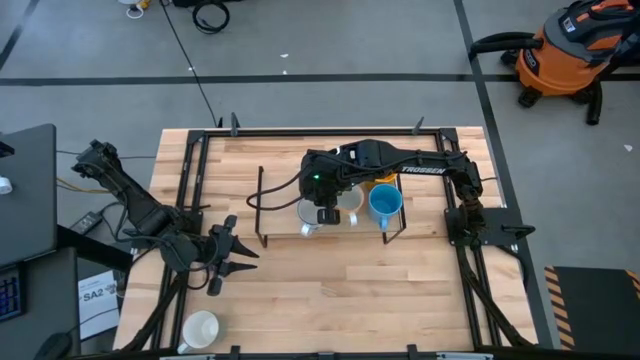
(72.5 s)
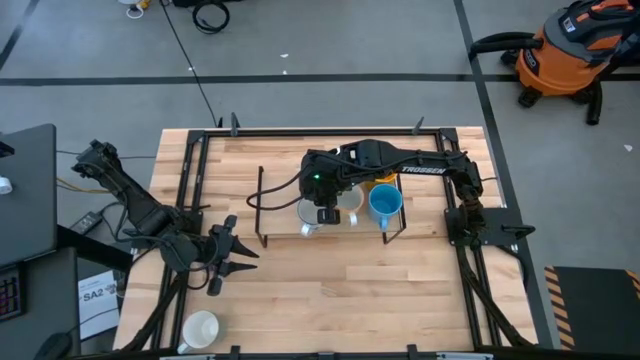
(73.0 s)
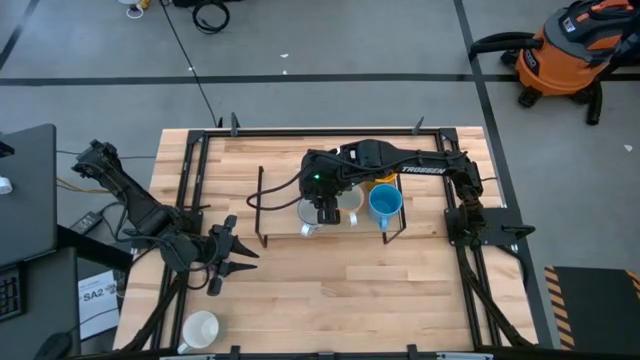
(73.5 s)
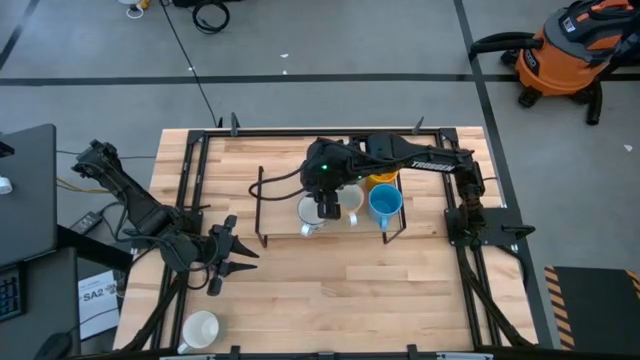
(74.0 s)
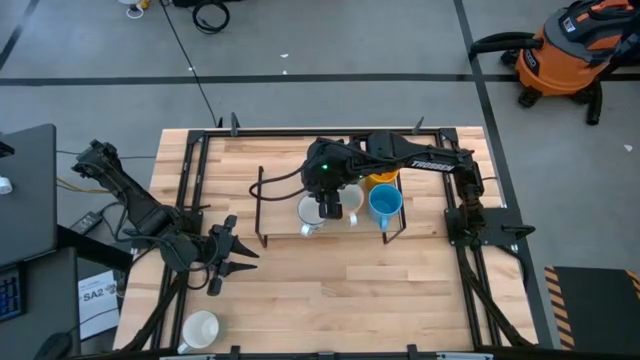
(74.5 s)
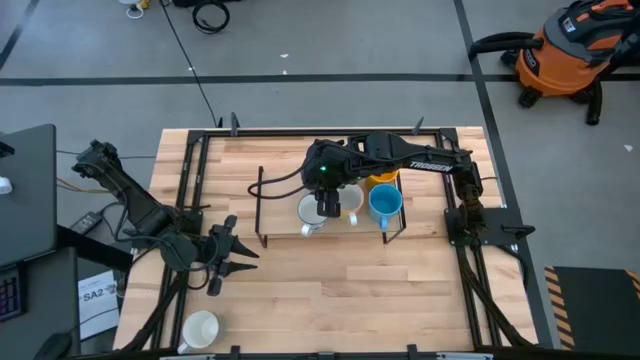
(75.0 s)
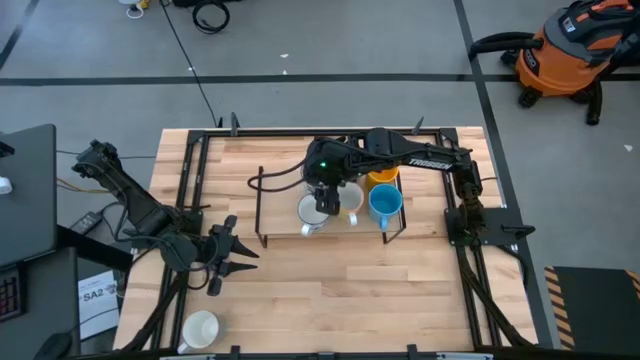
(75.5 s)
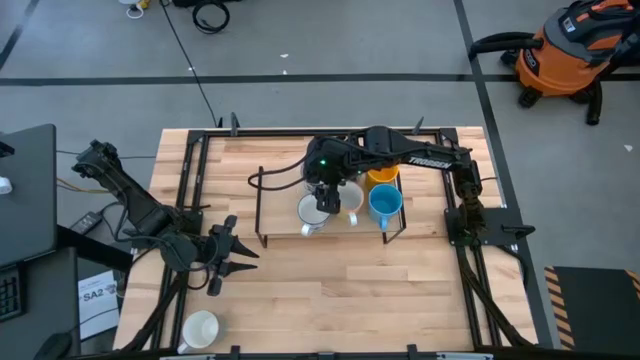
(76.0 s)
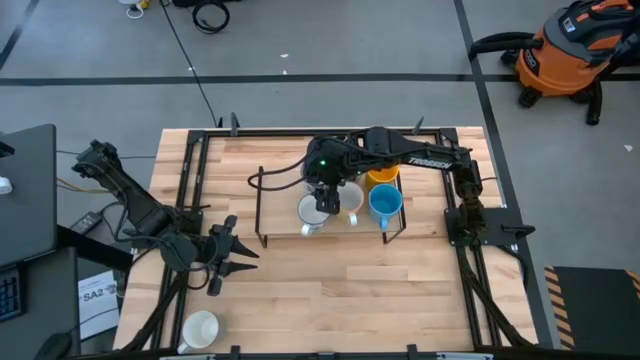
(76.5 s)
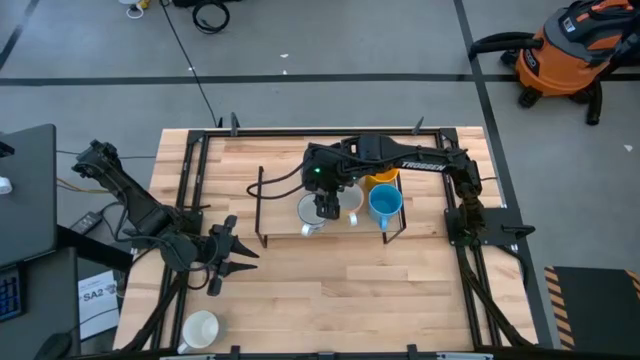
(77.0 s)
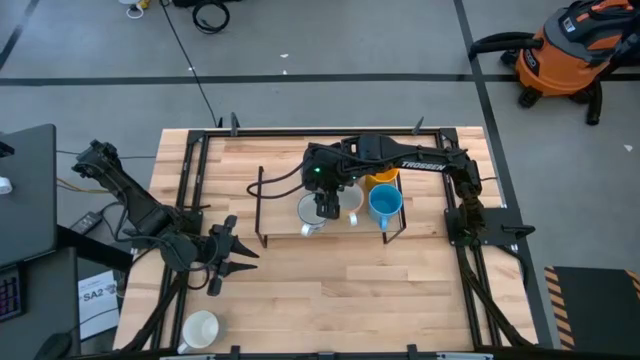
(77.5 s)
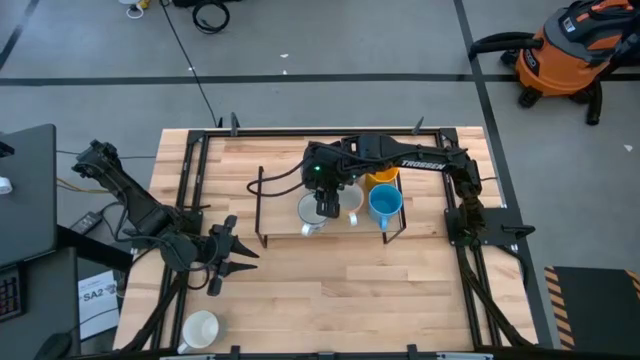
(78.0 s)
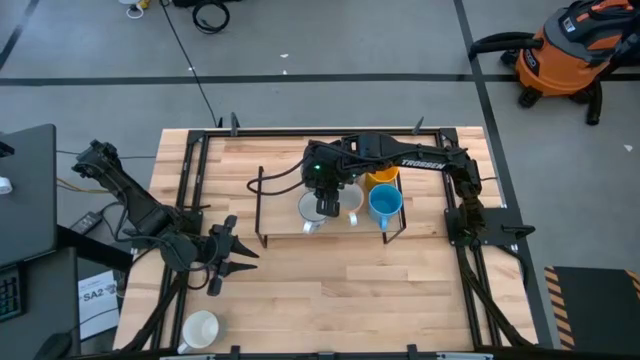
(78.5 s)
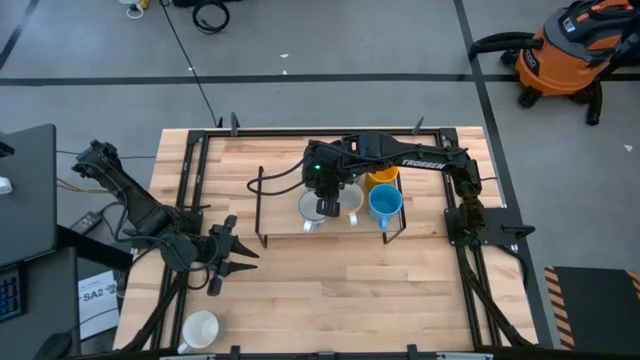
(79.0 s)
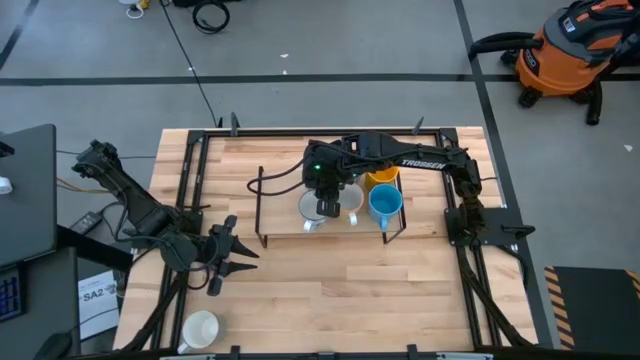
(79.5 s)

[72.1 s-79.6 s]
Task: Place coffee mugs
Adjust the blue patterned mugs on the shelf

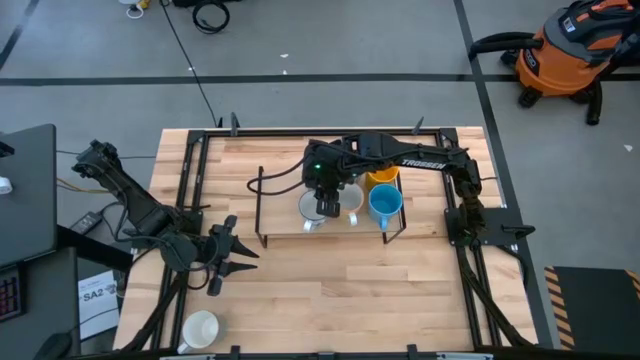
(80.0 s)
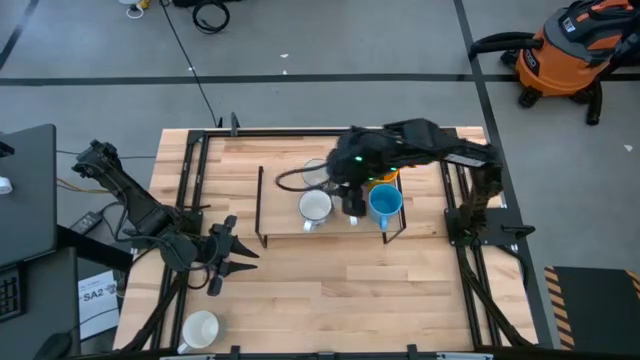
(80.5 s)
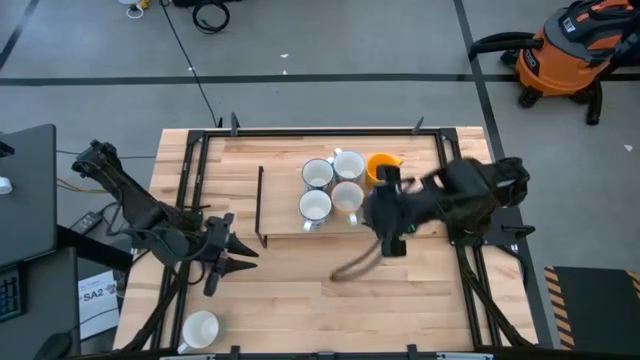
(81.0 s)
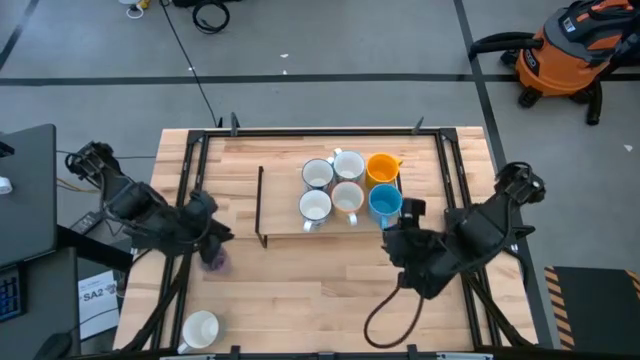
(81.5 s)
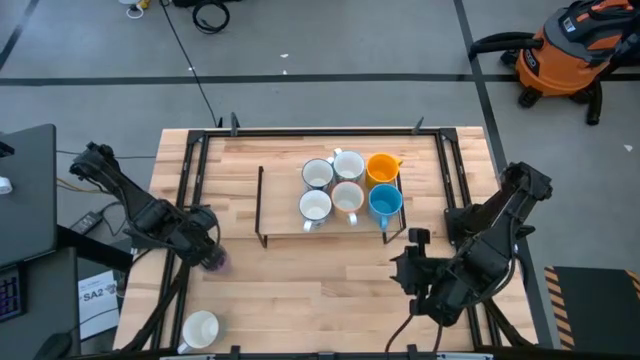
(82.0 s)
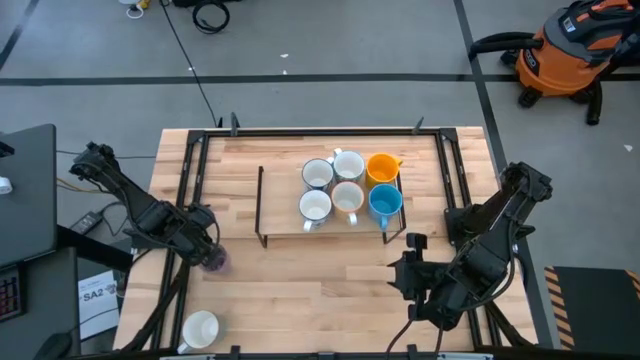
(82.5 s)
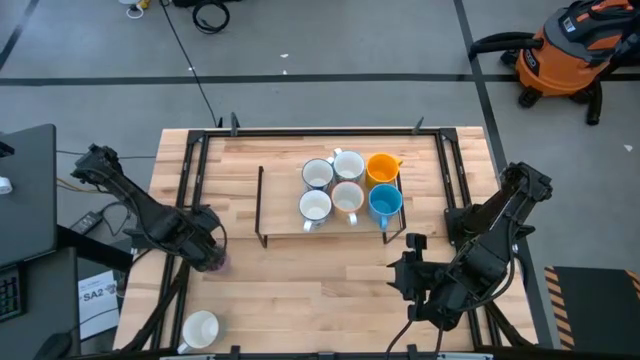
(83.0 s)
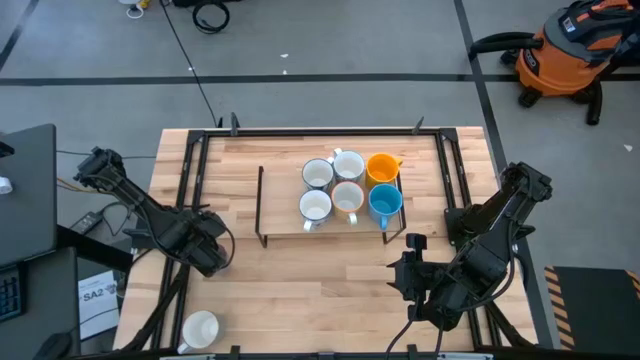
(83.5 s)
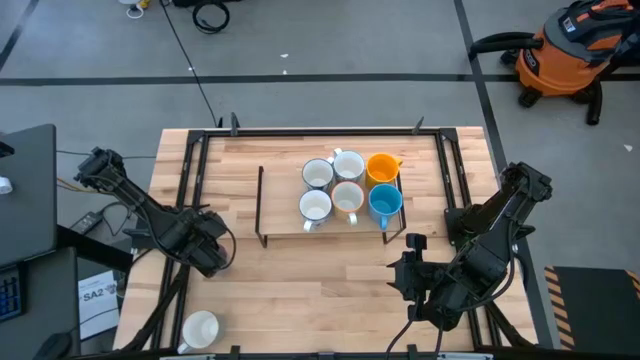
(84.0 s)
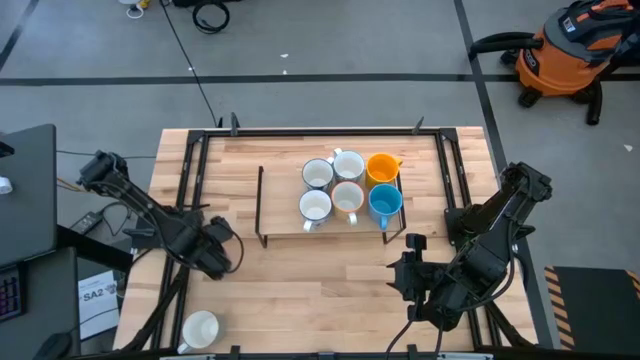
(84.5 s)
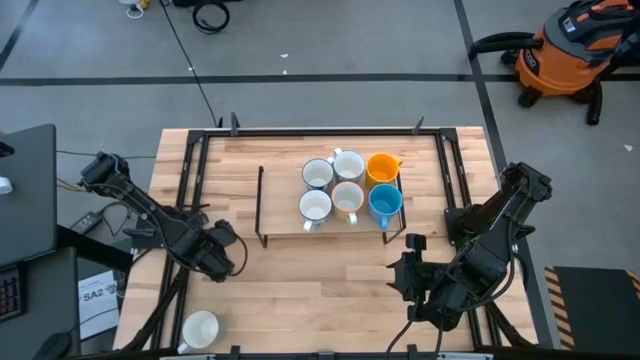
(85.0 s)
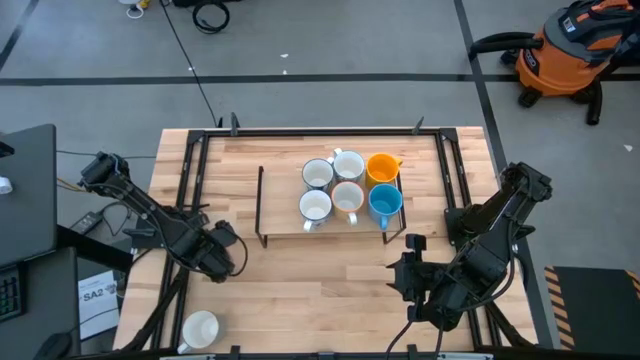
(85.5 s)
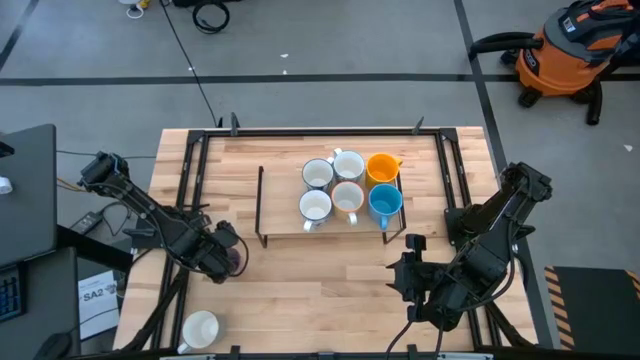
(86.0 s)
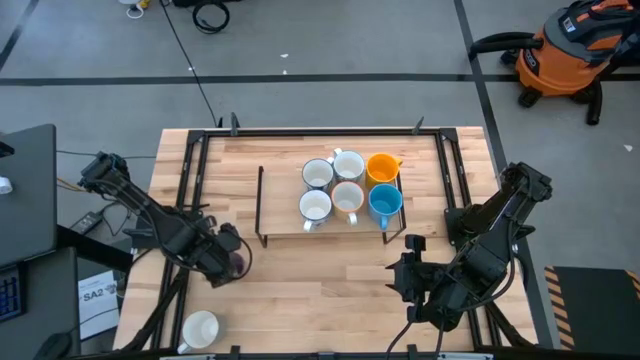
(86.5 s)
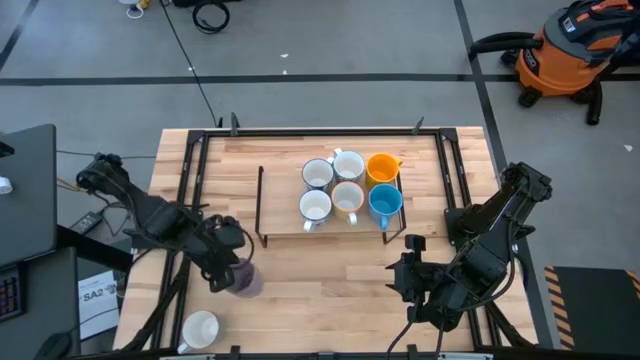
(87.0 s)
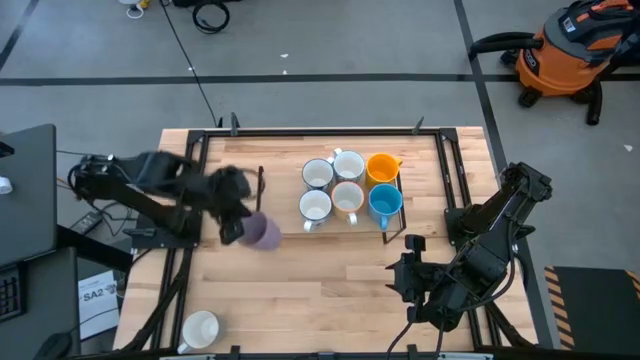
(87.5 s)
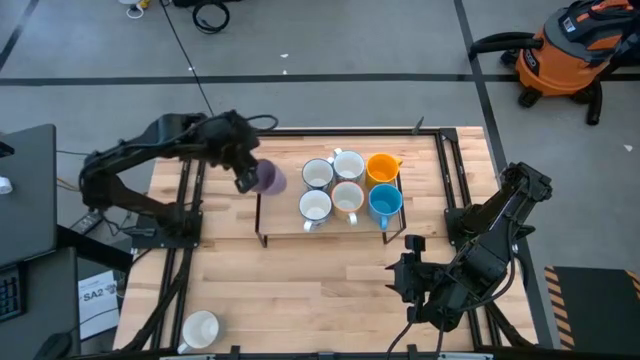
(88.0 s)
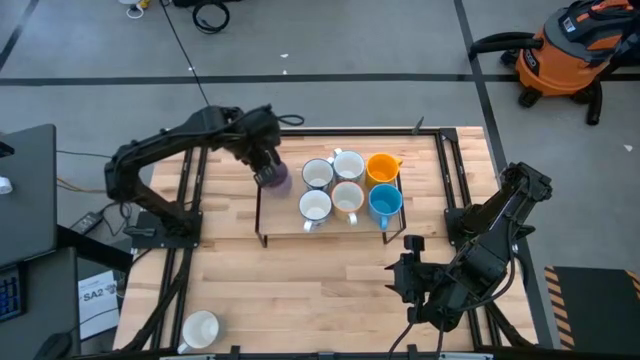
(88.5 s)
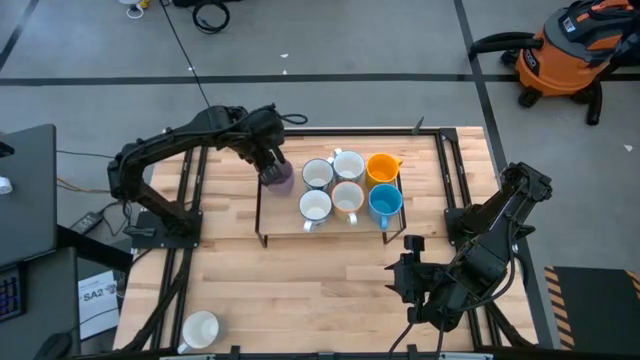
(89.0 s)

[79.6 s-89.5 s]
Put the purple mug on the shelf

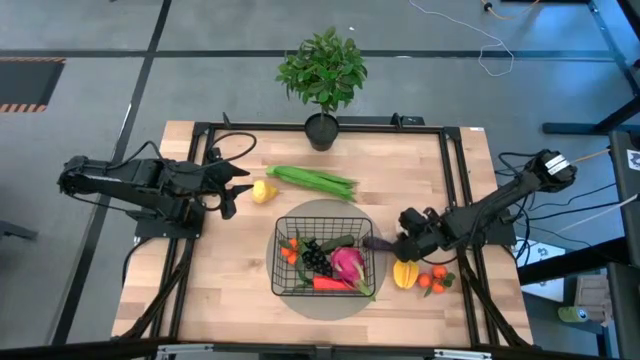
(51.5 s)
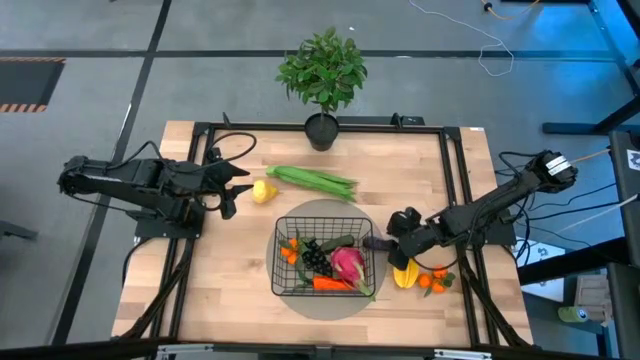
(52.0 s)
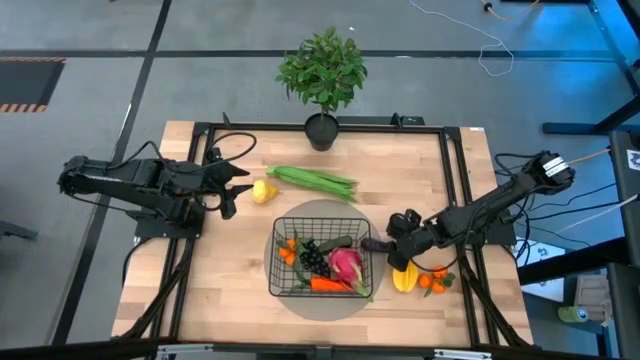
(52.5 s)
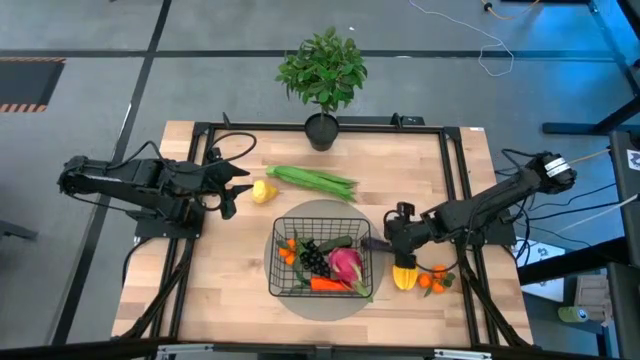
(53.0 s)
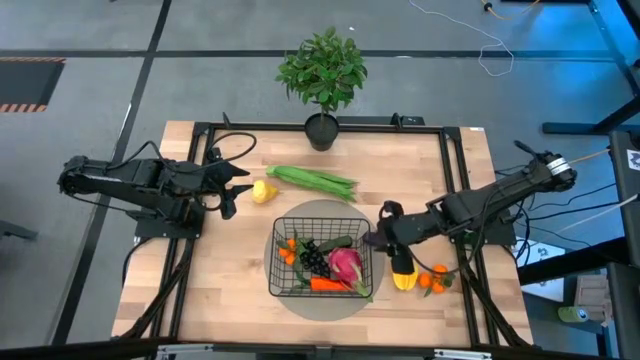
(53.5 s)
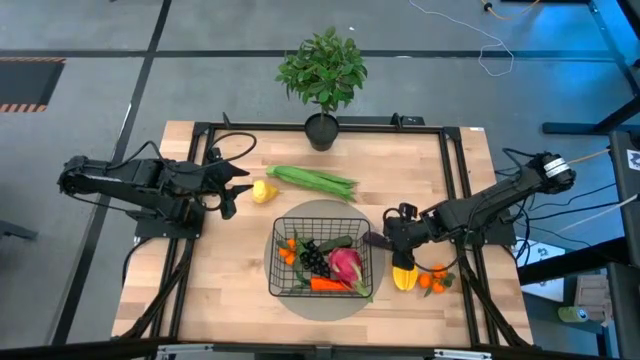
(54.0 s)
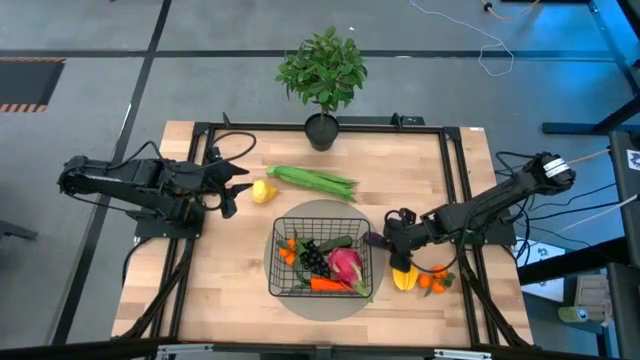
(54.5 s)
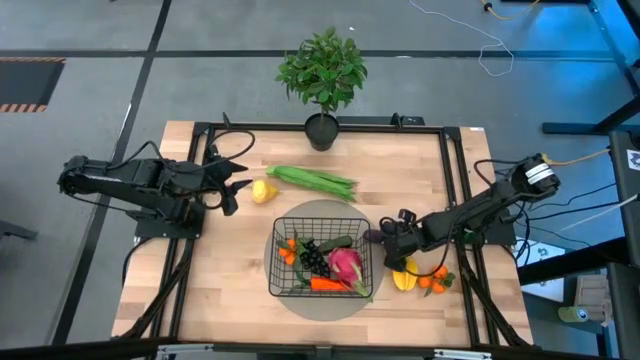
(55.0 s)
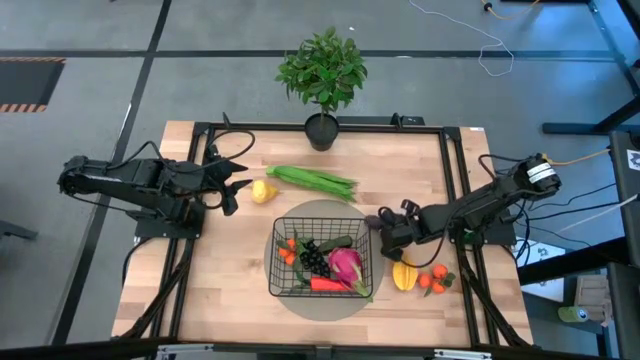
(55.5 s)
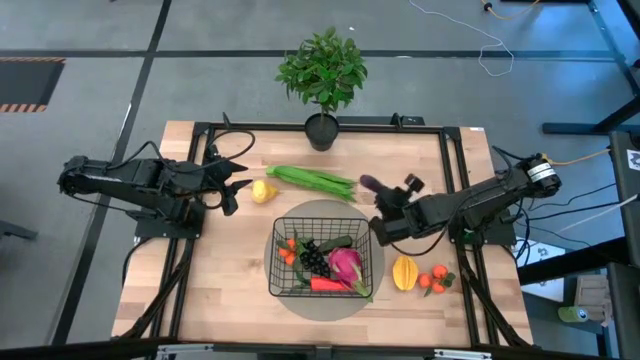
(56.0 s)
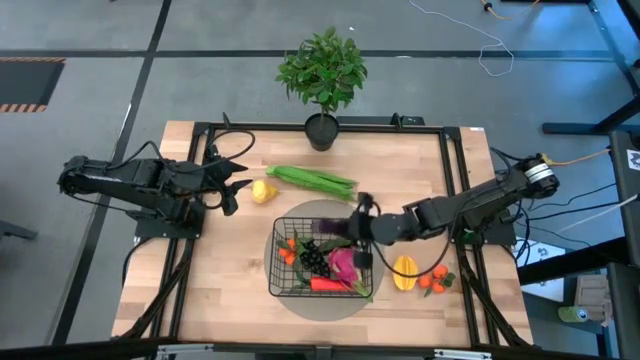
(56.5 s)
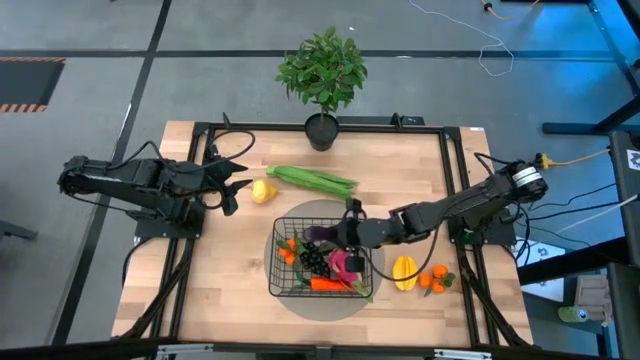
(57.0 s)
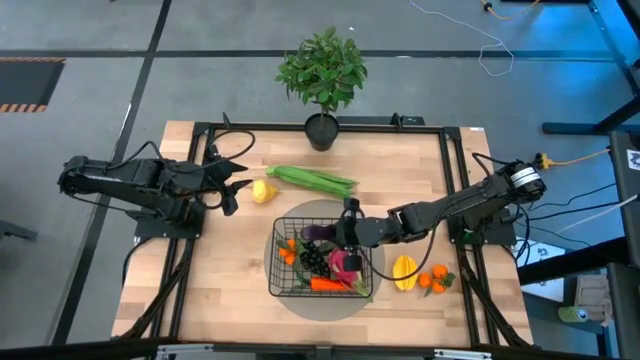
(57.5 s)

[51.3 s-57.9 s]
Task: Build produce basket
Put the eggplant into the black wire basket
